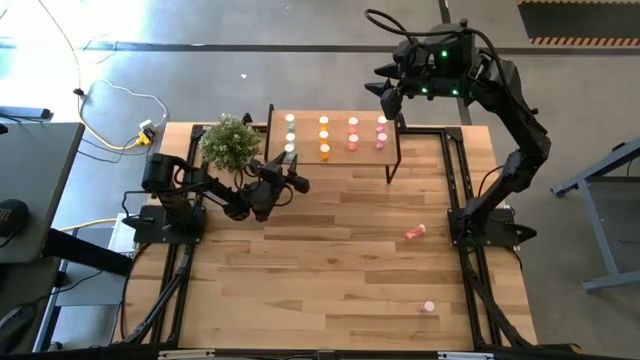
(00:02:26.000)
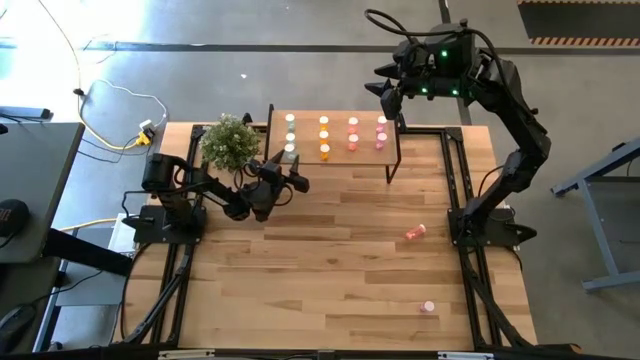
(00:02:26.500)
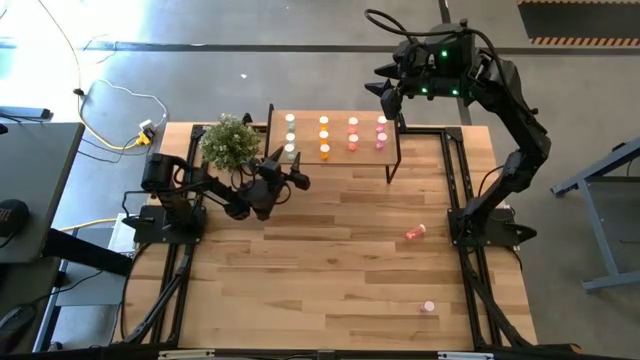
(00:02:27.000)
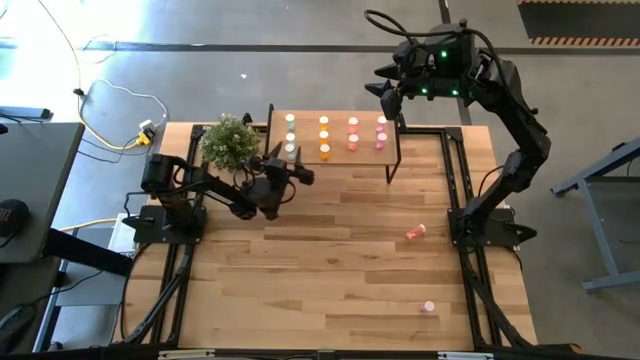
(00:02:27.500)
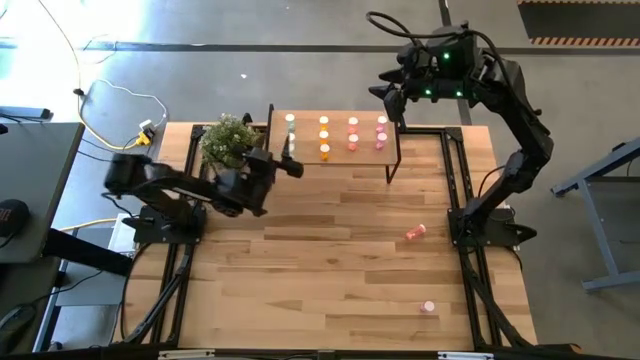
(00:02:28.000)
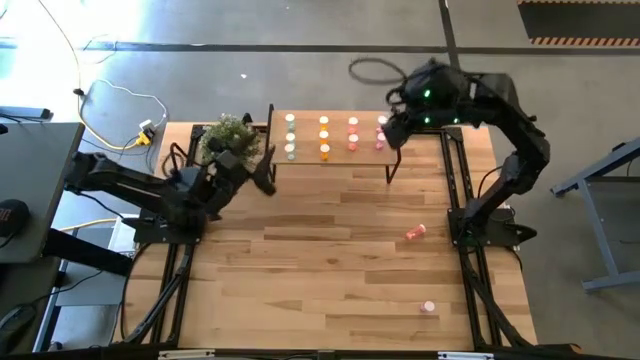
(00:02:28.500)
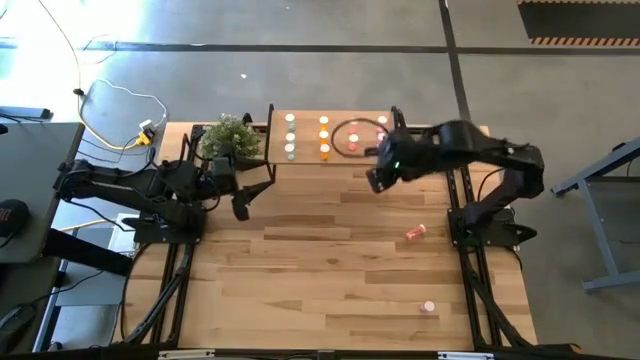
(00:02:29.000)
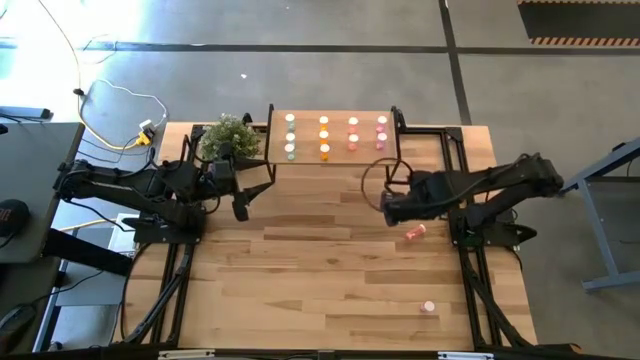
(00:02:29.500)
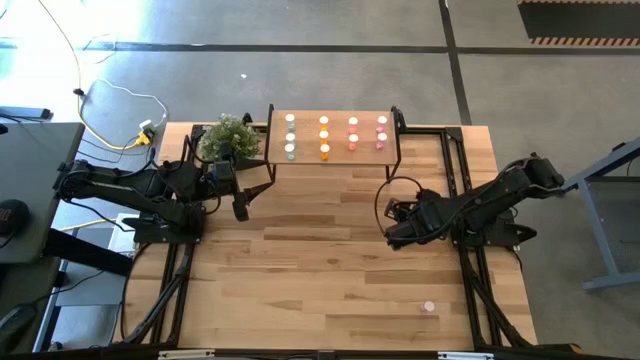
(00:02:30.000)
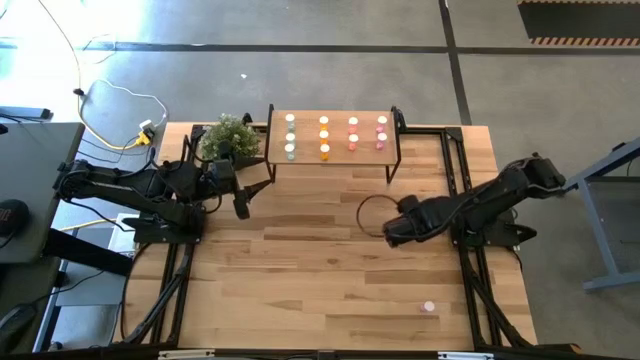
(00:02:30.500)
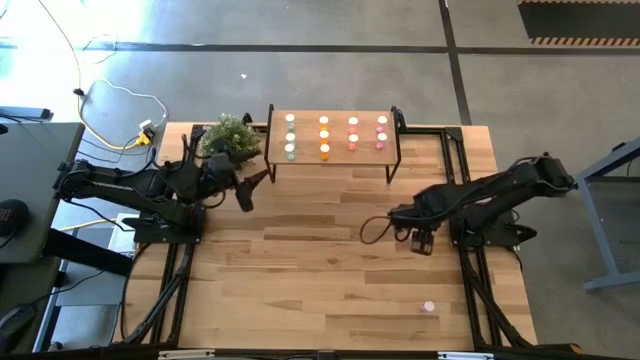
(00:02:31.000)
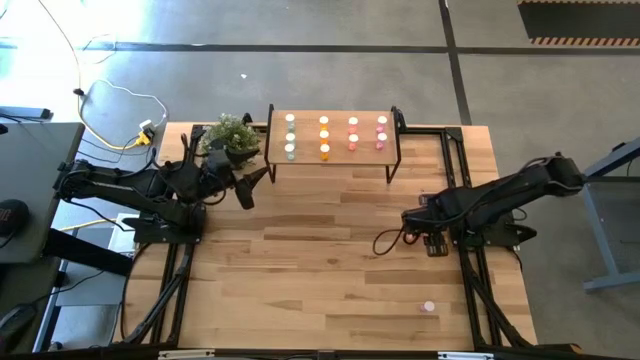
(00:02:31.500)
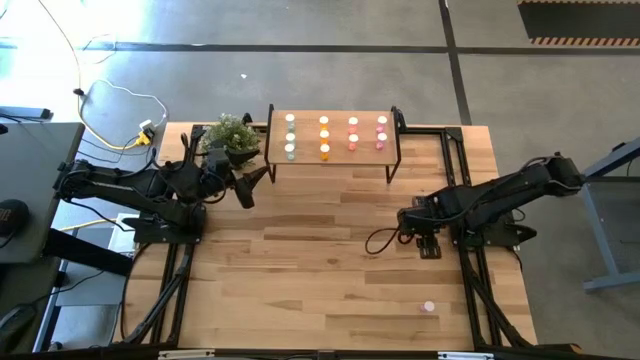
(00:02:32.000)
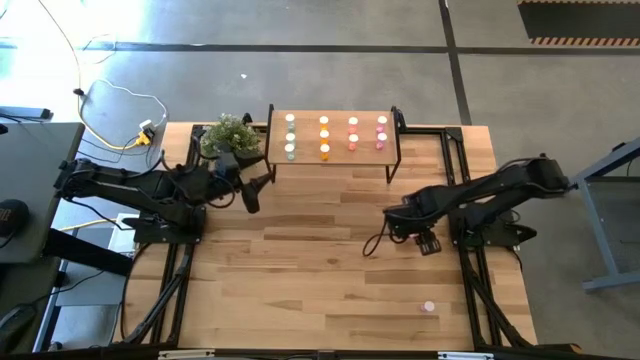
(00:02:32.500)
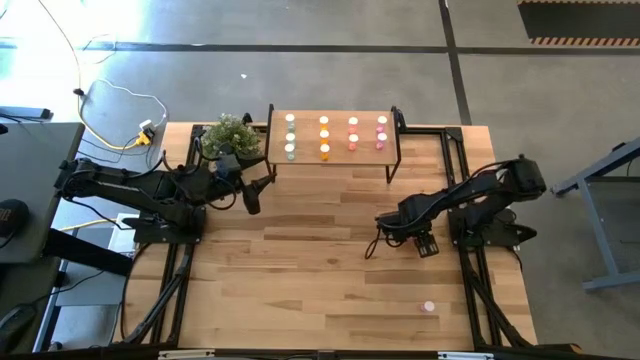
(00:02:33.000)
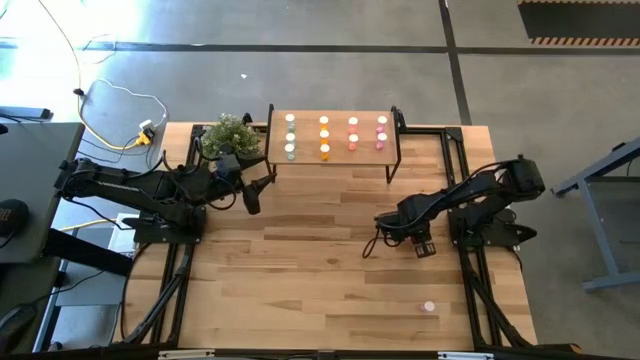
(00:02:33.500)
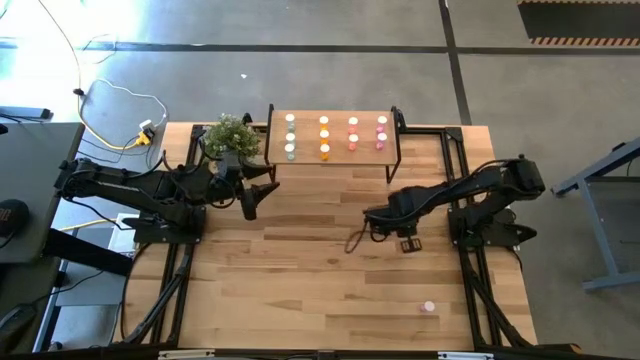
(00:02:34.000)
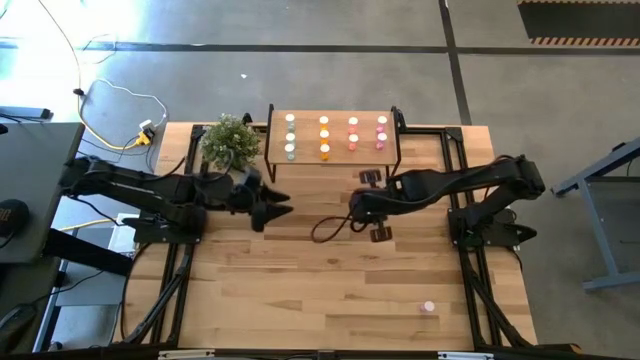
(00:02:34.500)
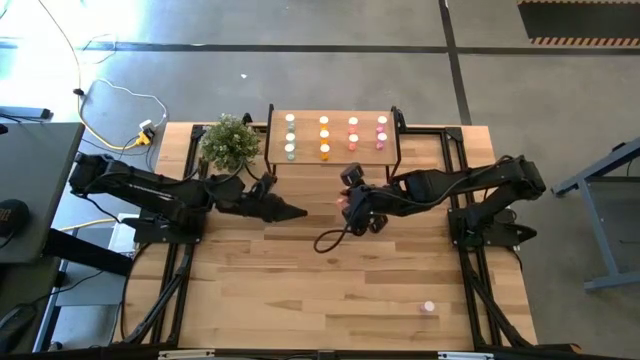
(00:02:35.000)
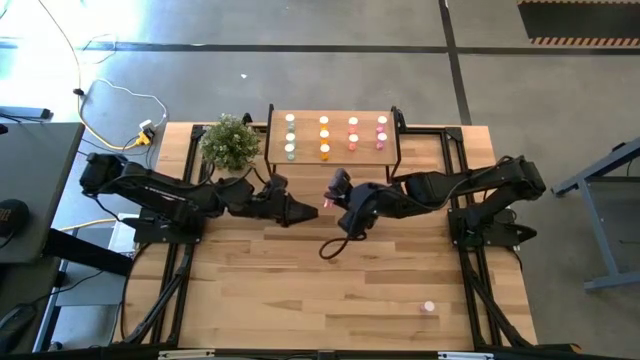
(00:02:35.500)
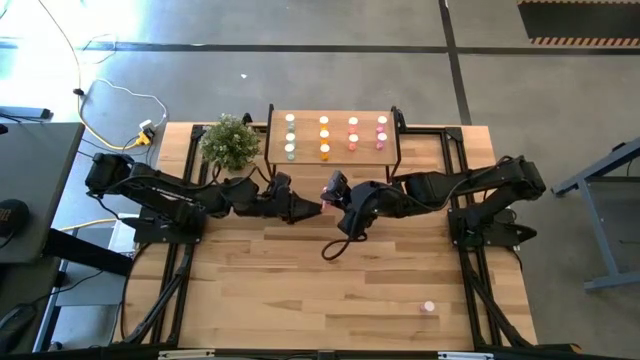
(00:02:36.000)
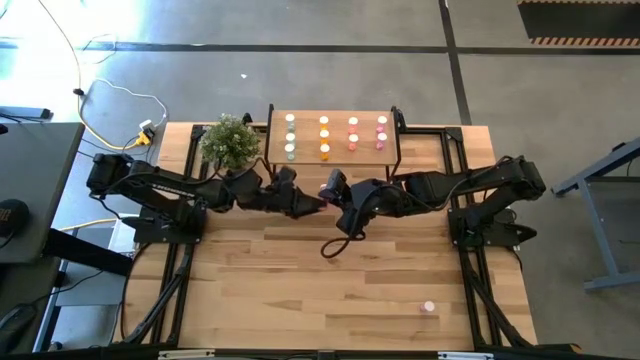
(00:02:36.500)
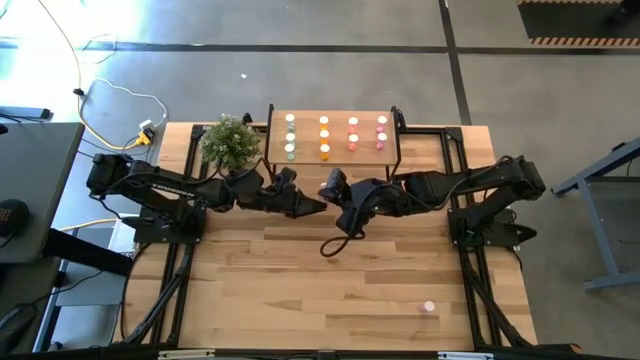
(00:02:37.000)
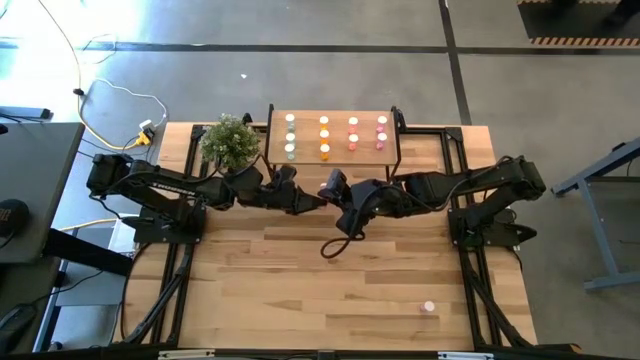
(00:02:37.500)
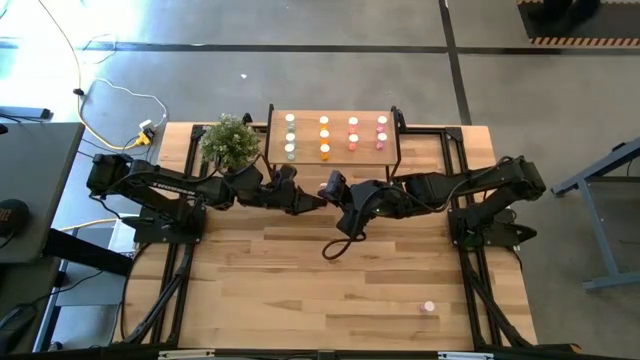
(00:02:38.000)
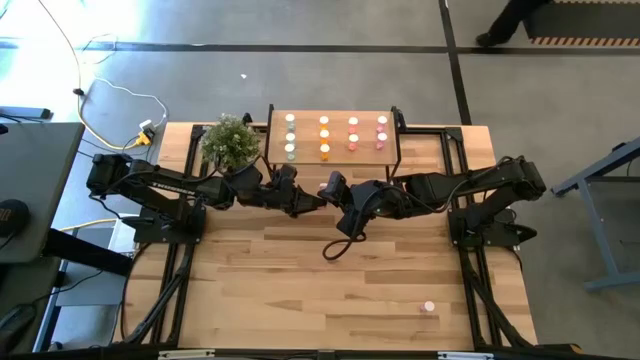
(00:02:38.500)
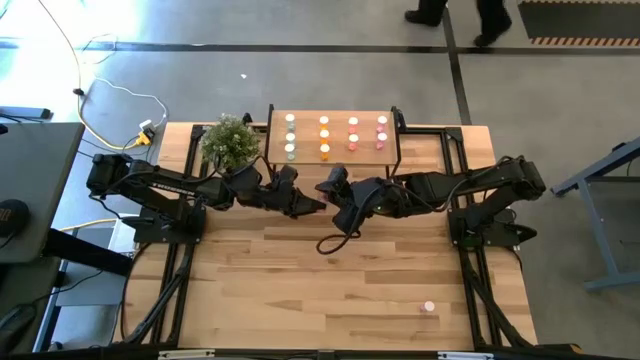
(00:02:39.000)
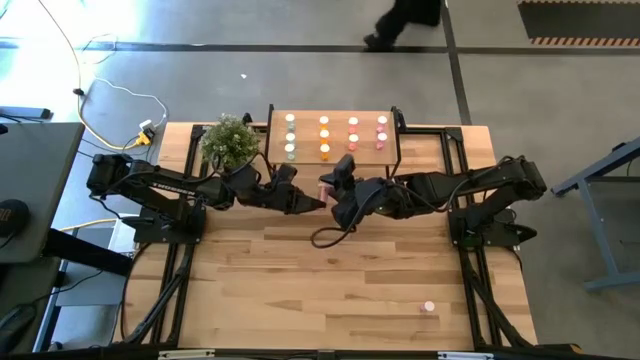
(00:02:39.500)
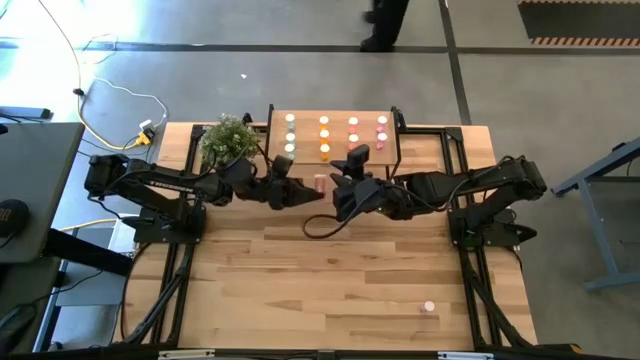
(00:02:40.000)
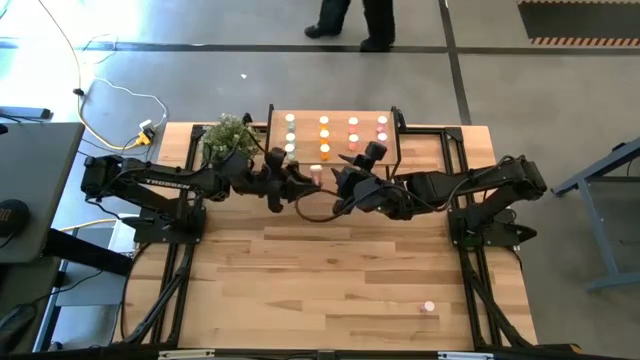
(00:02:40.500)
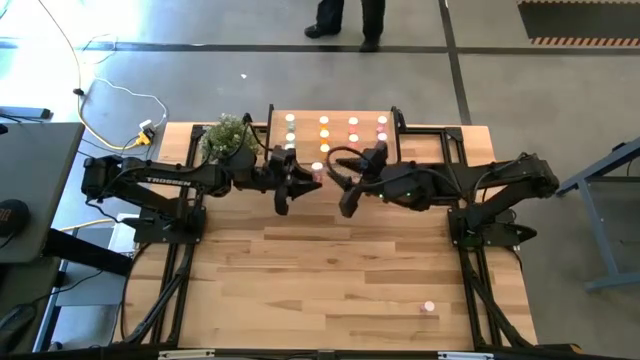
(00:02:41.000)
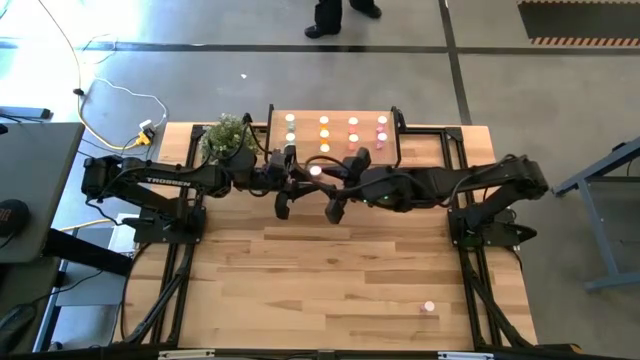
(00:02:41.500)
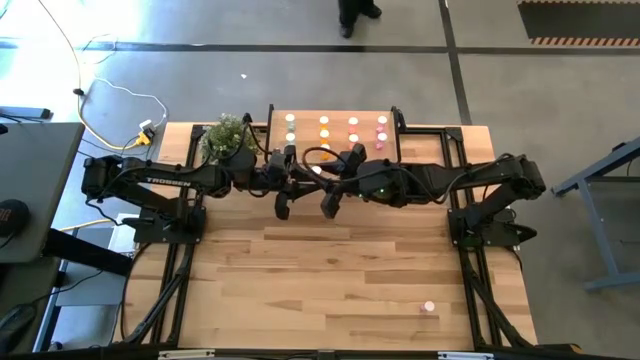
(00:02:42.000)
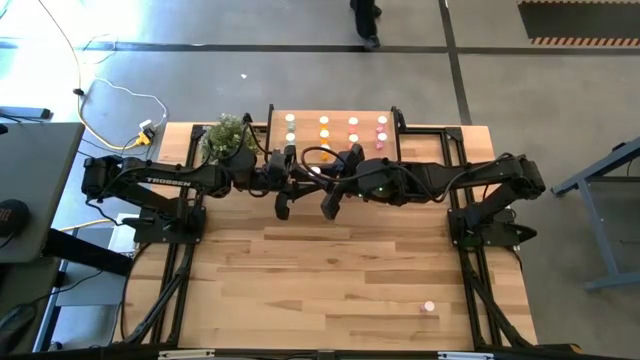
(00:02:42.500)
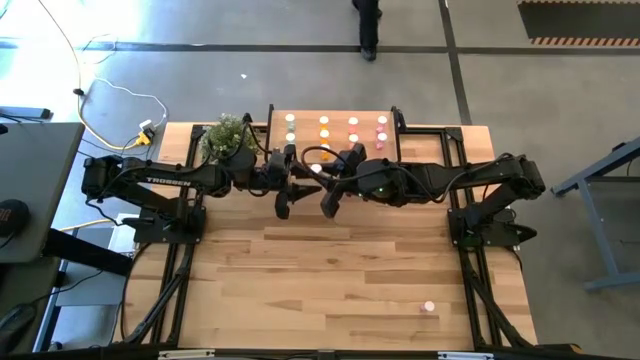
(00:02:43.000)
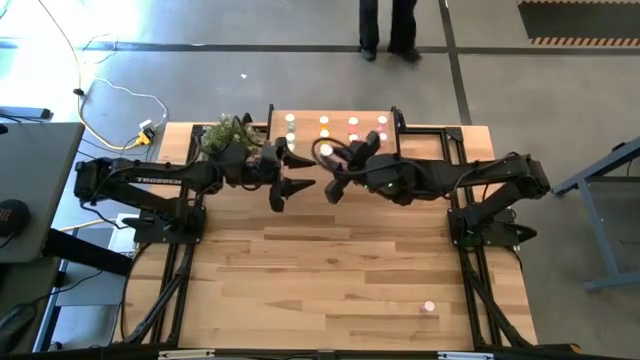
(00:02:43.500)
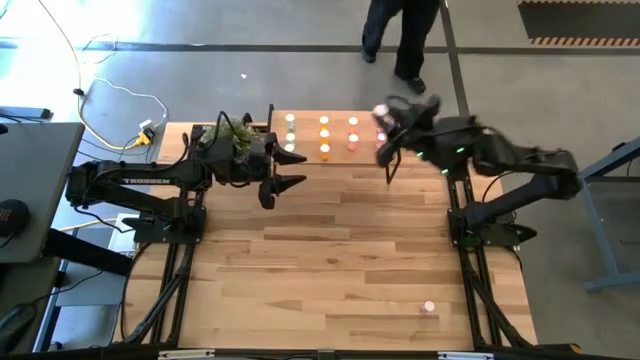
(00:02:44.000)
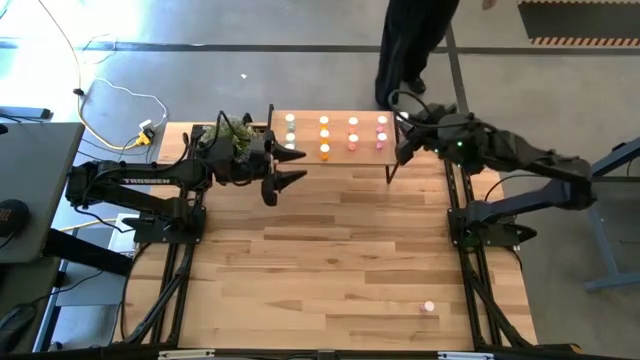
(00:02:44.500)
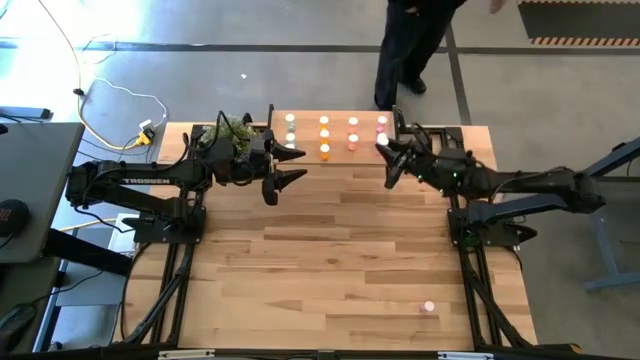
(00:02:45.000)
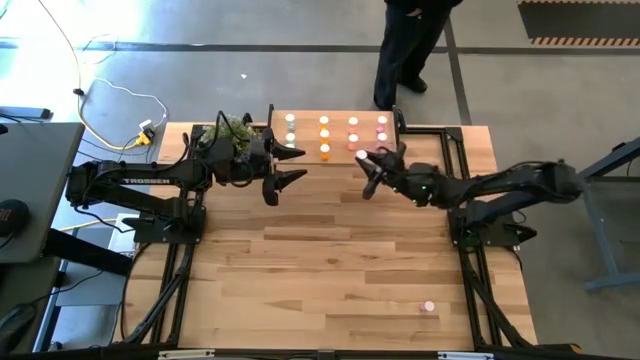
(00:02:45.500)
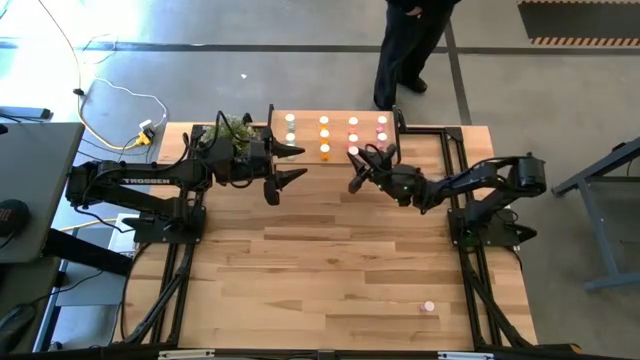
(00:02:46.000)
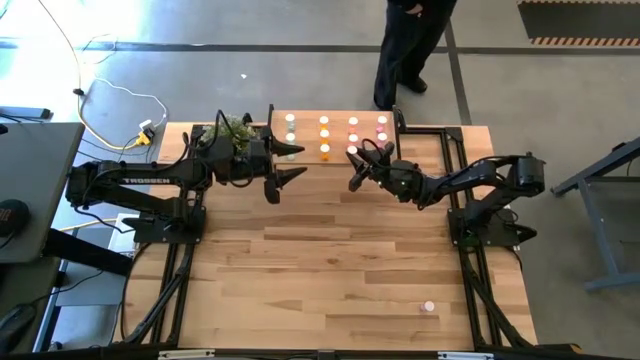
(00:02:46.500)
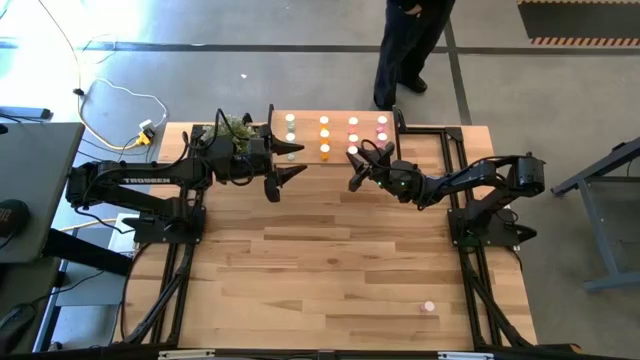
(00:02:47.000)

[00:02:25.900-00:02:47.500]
Task: Pick and place medicine bottles onto shelf by color
Put the pink pill bottle on the shelf aligned with the other pink pill bottles
